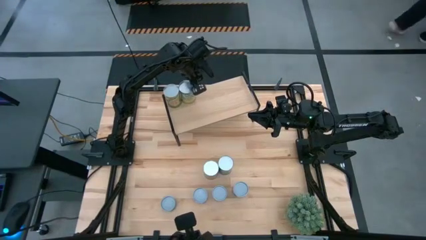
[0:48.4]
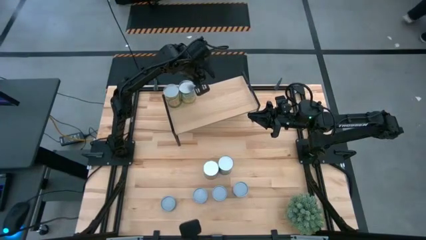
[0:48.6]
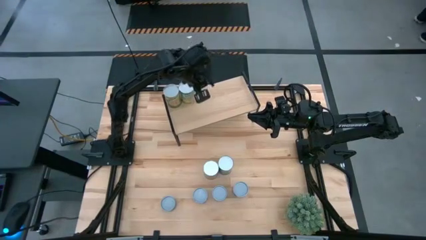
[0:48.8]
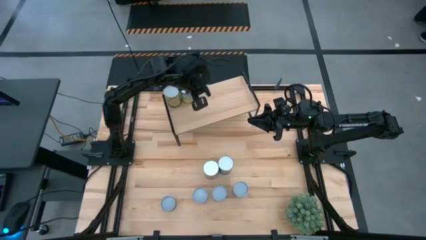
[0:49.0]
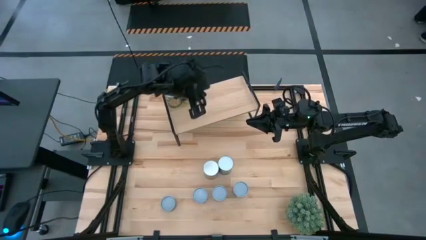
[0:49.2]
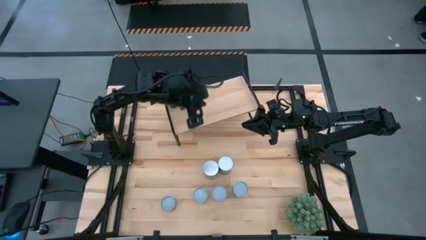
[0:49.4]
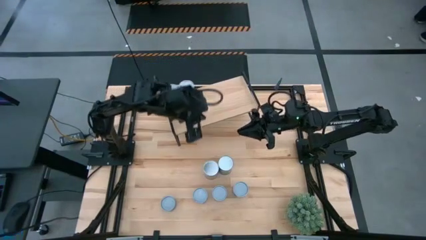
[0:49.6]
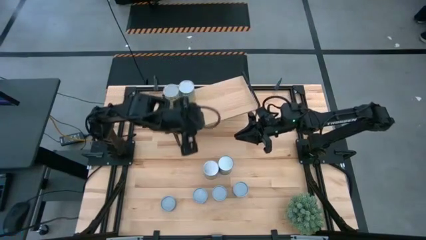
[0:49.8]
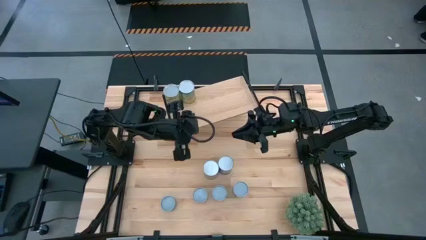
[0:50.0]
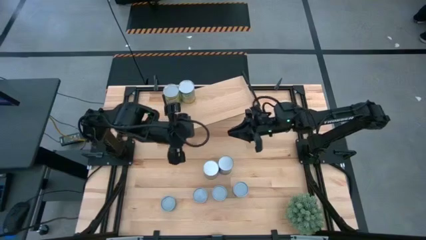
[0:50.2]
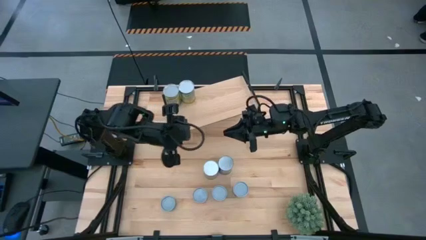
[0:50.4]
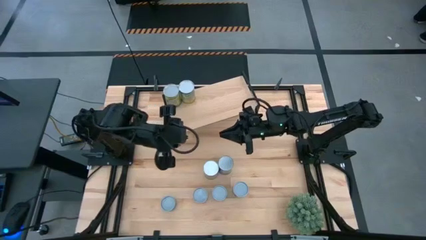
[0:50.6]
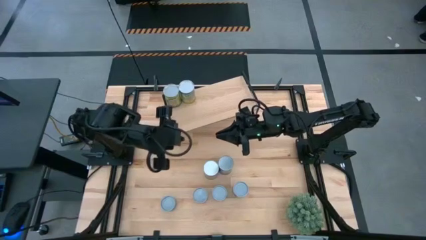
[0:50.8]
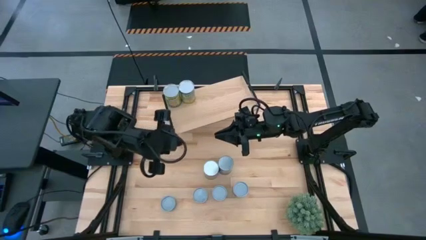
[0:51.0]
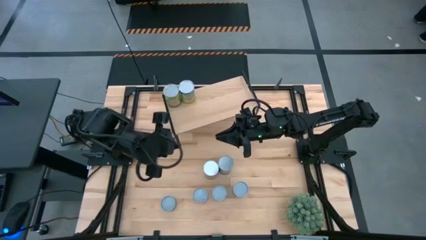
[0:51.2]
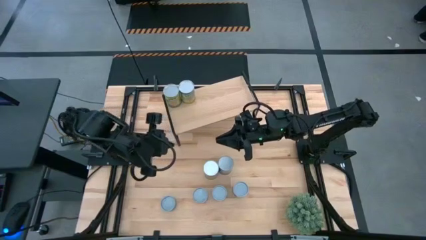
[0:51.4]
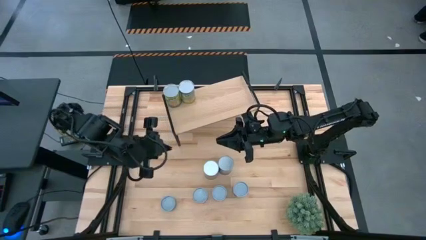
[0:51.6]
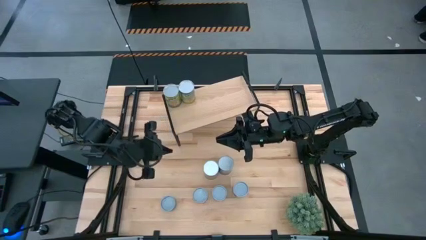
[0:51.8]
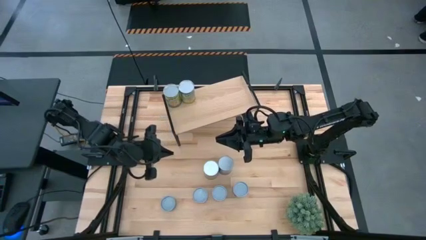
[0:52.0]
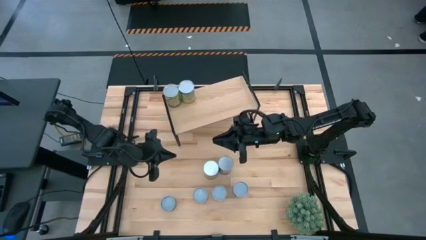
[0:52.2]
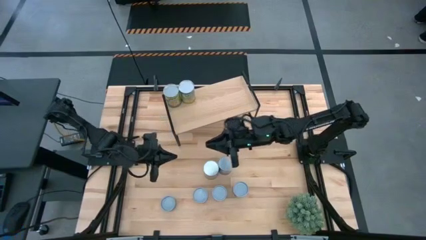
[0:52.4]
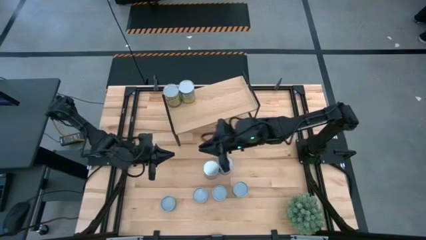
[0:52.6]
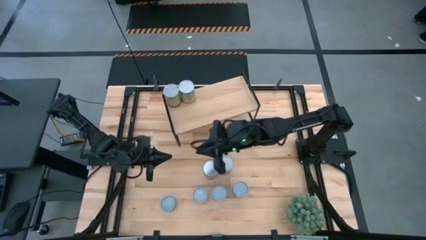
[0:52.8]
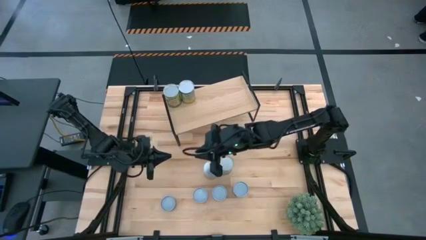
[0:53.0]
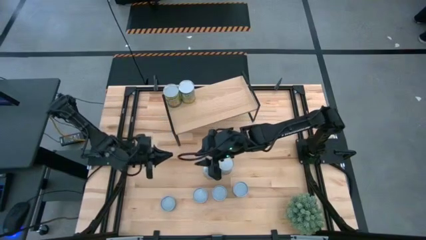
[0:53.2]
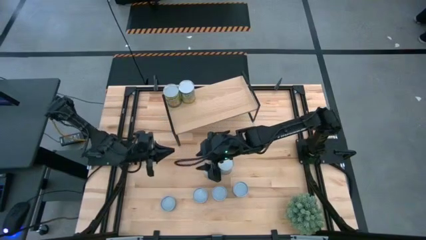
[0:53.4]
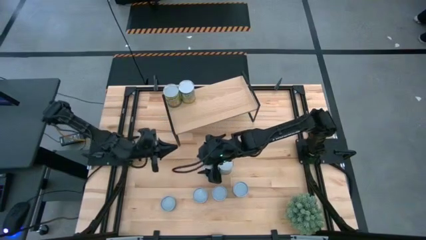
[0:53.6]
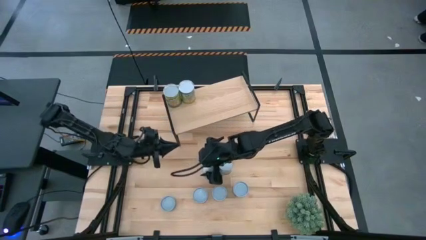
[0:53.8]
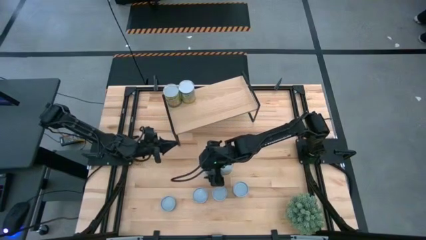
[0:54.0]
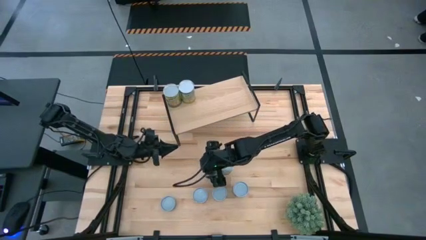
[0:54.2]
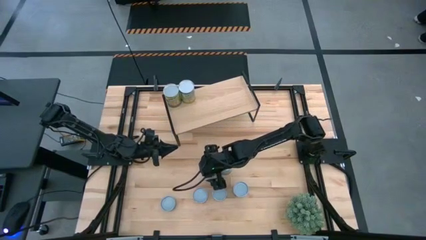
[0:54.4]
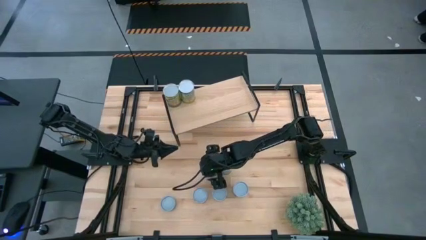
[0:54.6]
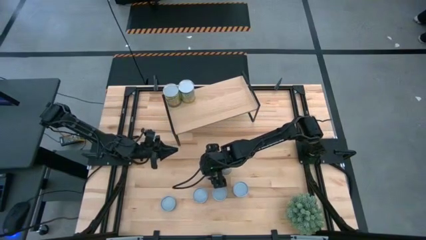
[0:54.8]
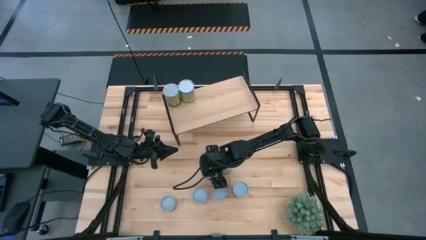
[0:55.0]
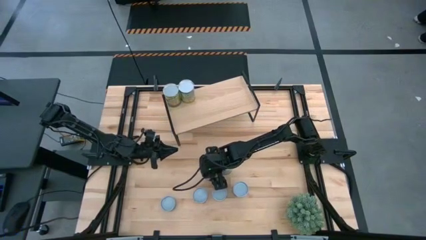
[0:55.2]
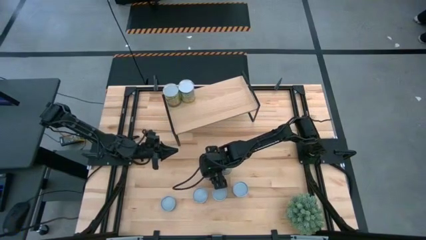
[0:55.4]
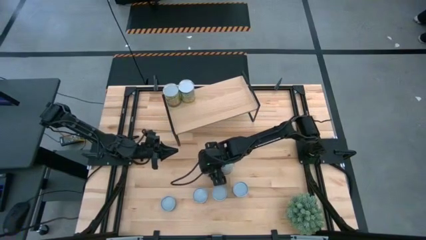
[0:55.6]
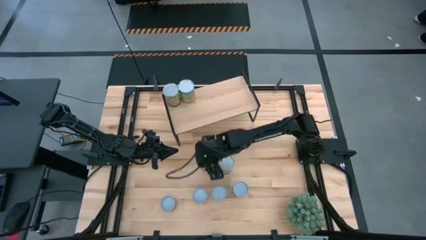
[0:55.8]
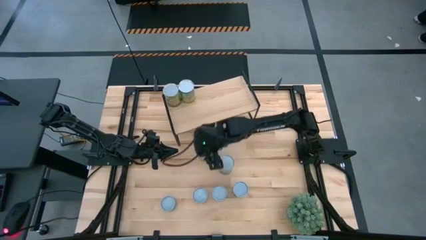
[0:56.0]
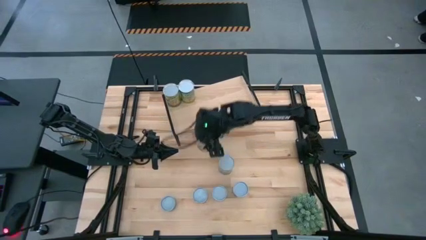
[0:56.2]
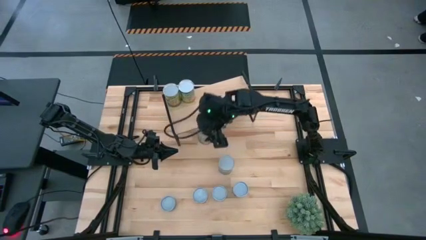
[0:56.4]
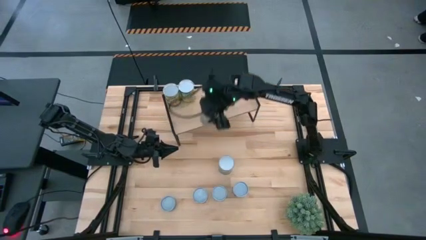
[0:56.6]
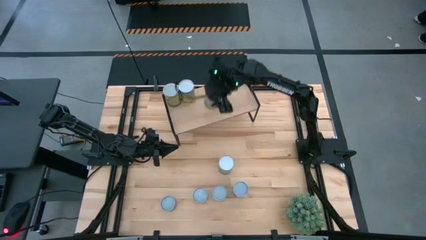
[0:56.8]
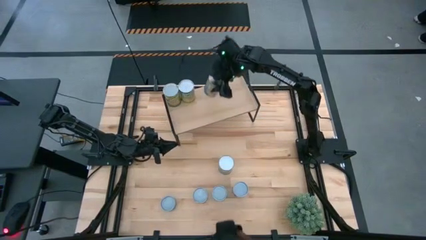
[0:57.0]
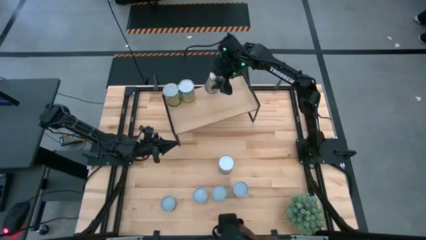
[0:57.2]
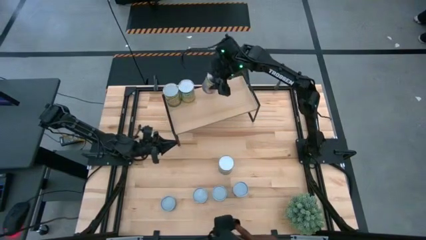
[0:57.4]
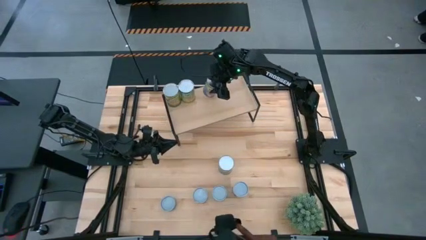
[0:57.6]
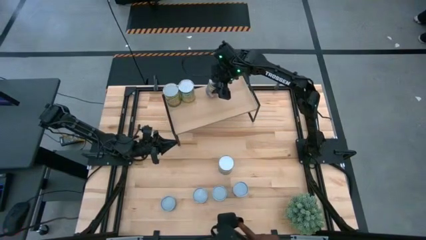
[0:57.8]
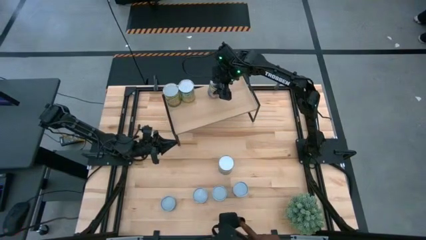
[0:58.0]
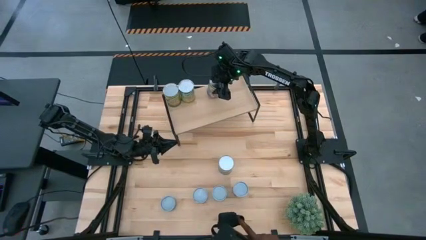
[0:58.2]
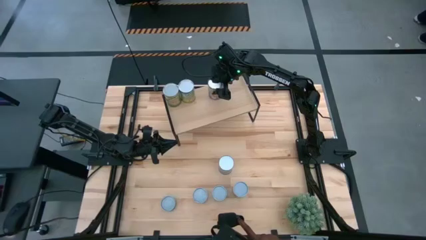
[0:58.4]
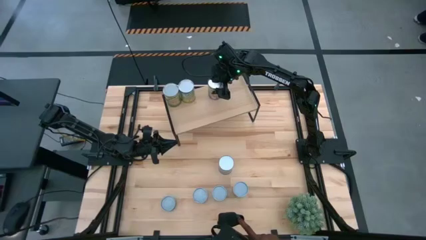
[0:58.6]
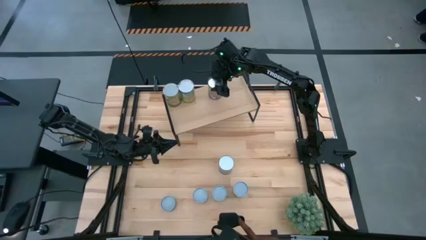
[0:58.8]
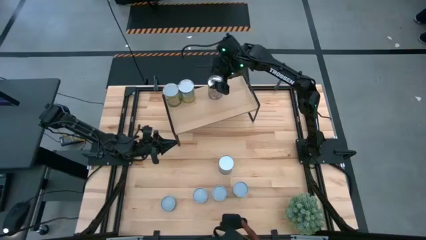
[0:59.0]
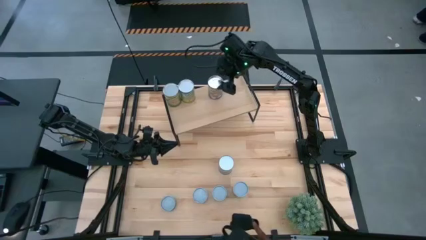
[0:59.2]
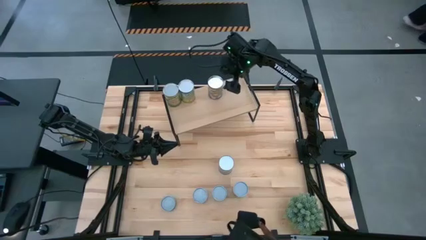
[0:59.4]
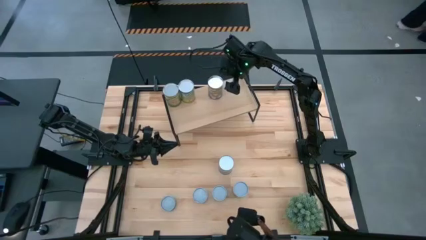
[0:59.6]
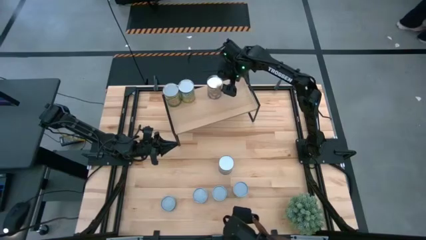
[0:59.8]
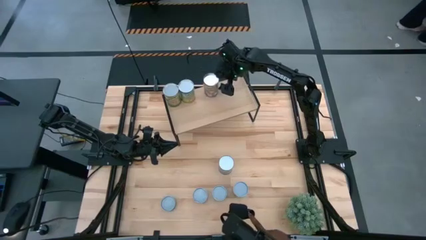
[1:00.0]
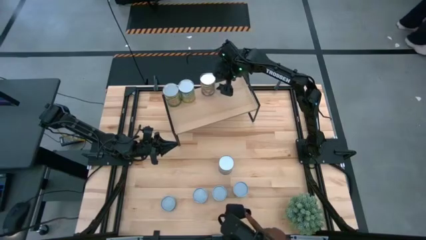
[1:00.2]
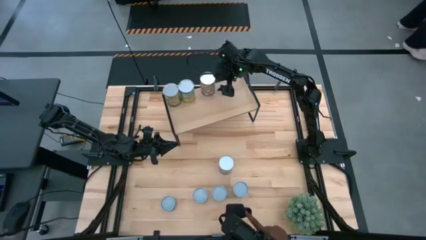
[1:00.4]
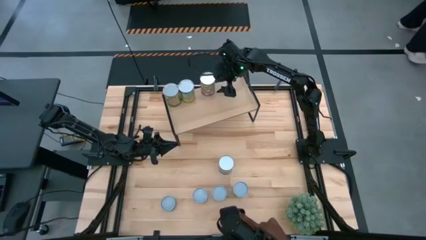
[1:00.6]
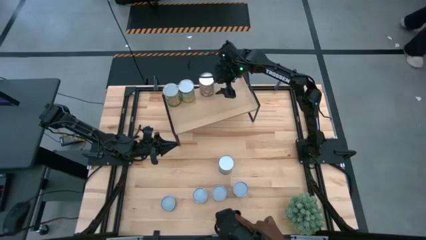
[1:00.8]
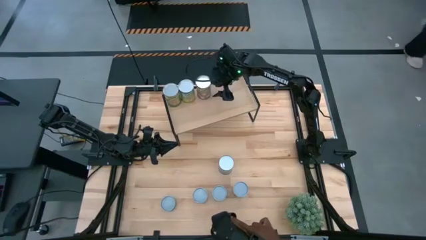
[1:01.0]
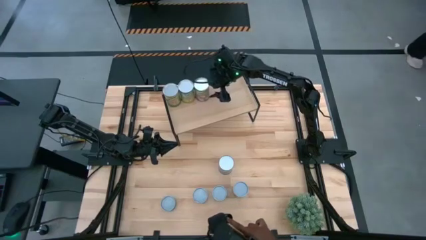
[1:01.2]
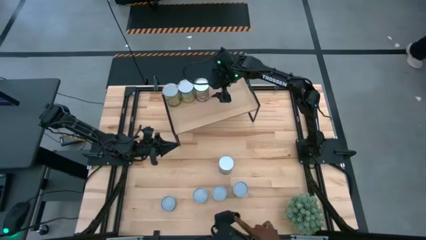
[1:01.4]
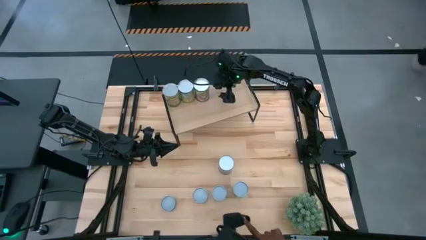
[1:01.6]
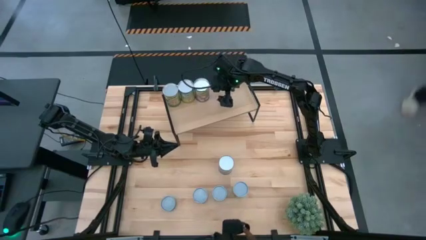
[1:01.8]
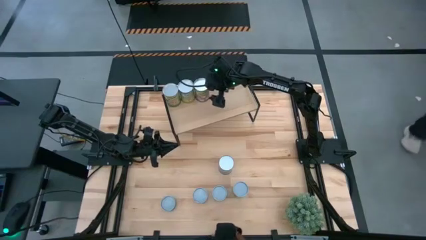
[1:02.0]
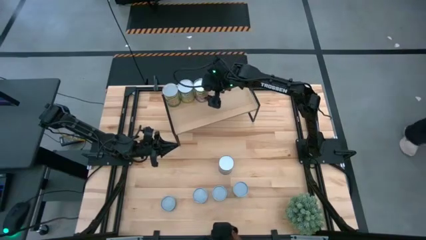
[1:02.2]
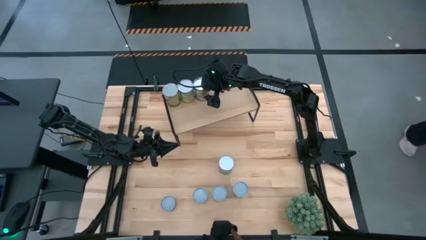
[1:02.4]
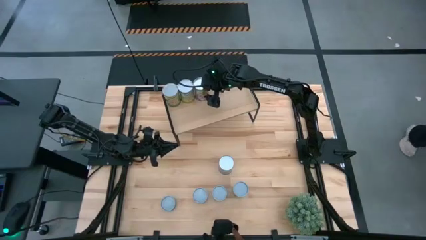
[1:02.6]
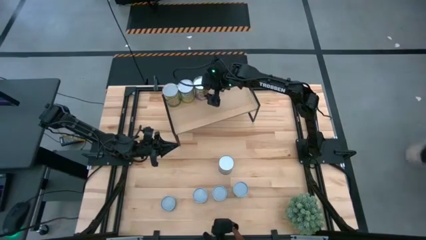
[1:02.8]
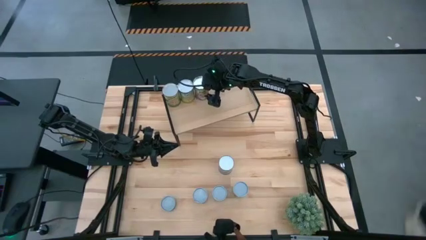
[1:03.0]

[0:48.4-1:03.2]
Task: Pick and place cans onto a shelf
Put the canned peaches on the shelf
